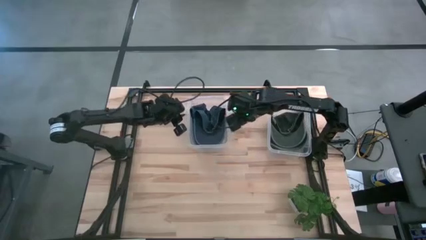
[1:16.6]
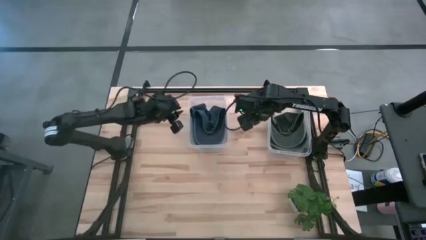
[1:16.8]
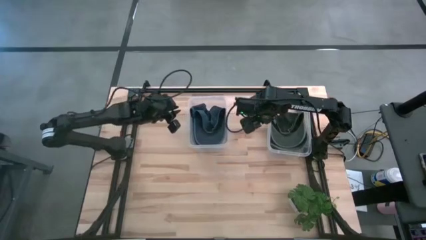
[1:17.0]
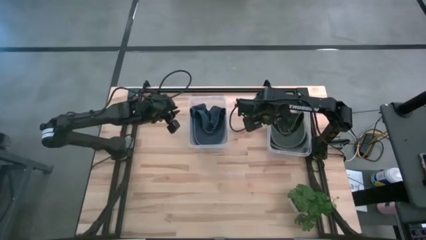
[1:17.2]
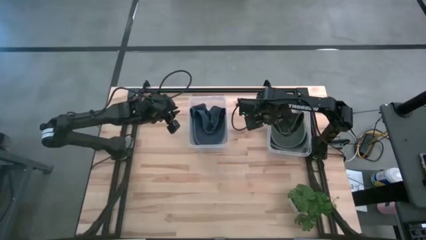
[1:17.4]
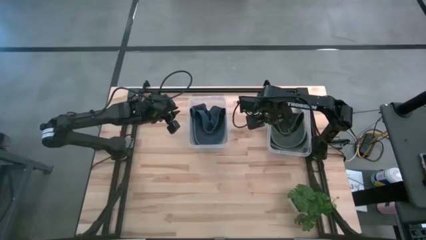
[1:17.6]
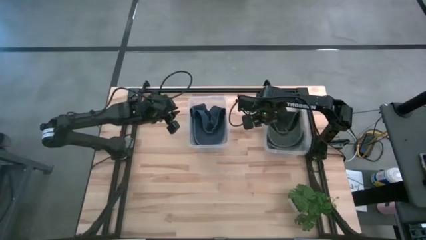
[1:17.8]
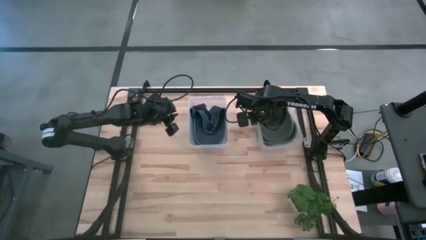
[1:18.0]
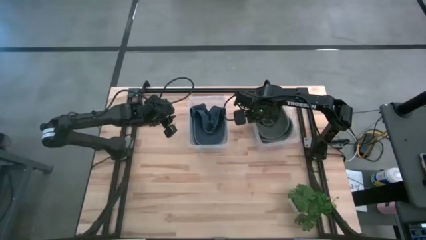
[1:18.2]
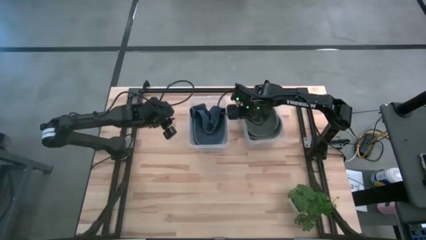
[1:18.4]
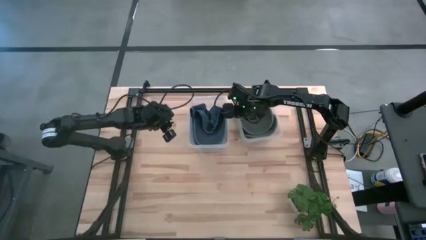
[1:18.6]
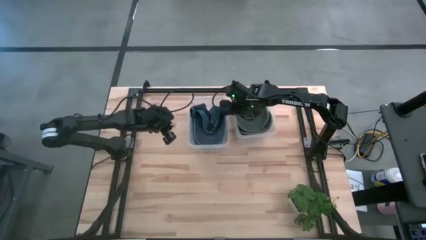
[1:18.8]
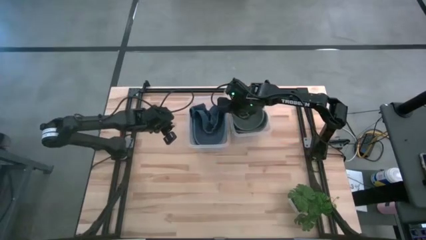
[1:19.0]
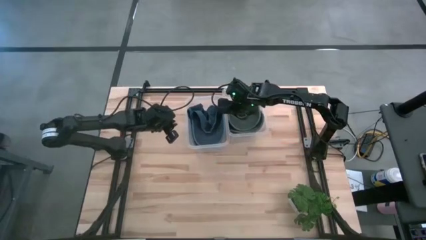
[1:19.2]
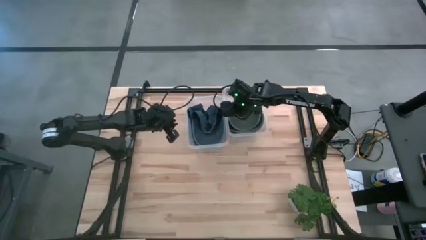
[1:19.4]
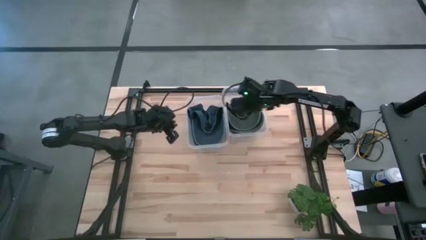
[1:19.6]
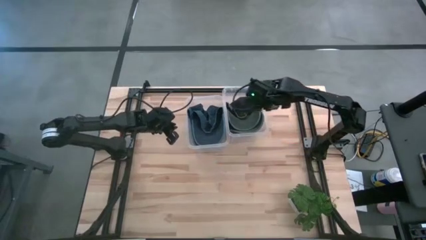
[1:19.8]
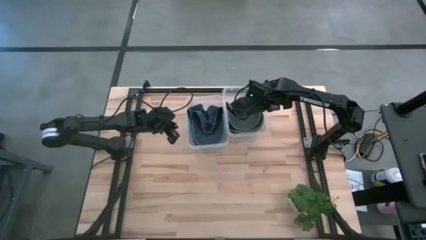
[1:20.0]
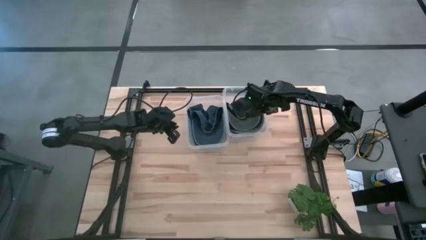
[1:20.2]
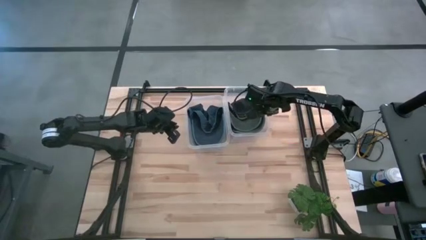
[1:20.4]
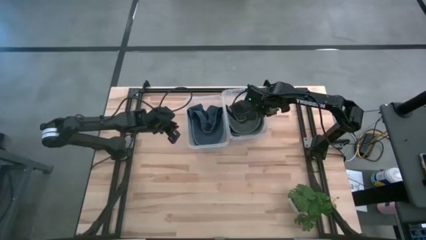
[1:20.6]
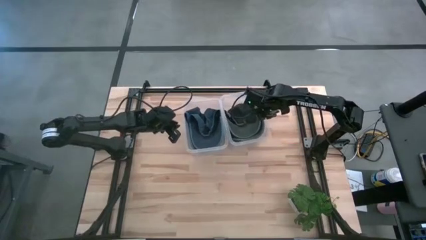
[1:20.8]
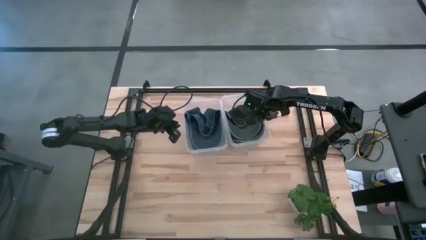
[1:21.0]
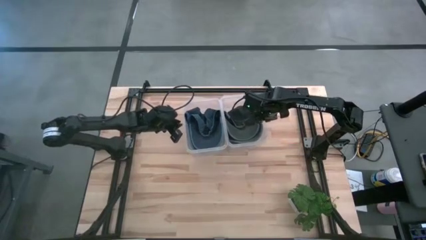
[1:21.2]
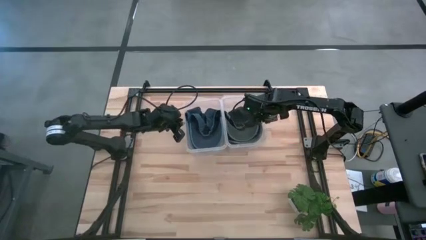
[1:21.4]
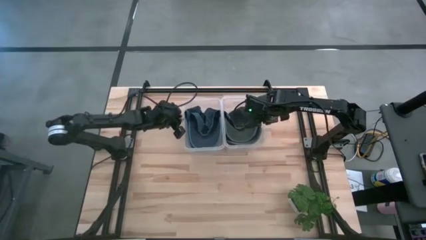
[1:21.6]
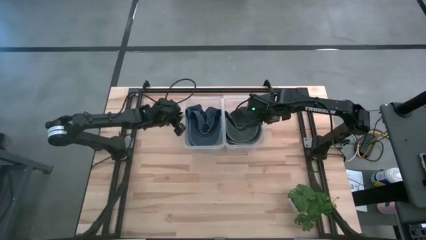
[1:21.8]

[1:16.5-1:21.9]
Task: Pick & Place hat
Adjust the right transparent bin on the table

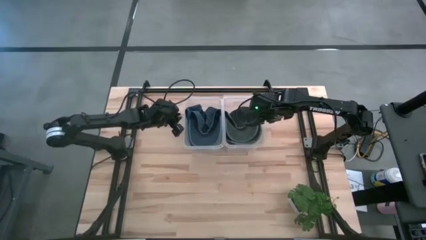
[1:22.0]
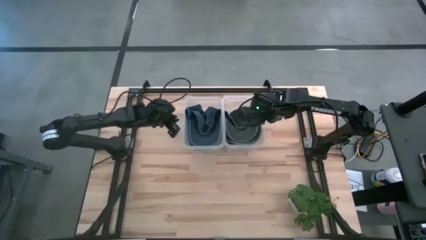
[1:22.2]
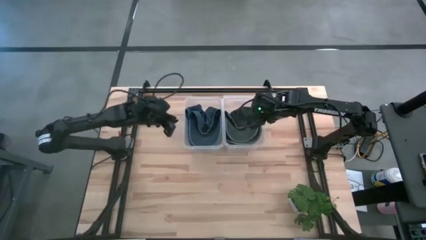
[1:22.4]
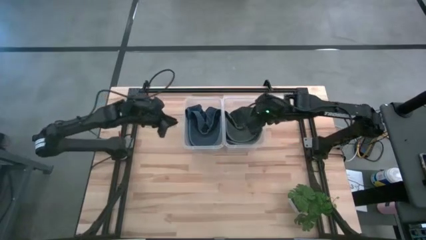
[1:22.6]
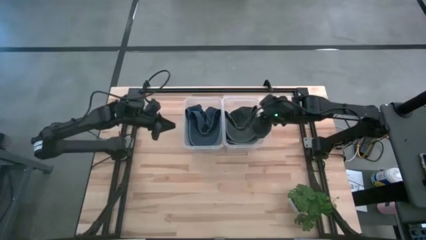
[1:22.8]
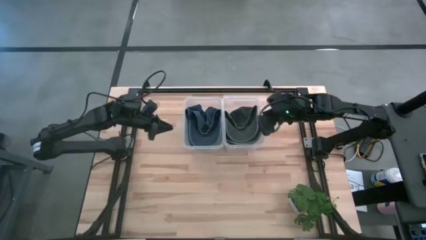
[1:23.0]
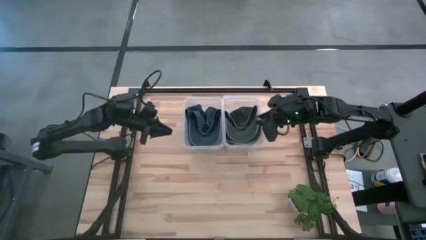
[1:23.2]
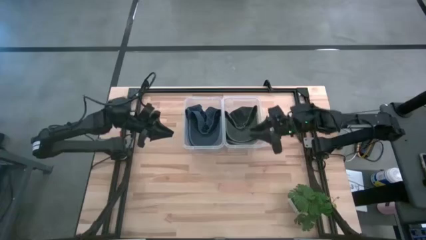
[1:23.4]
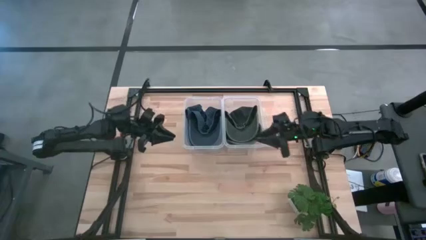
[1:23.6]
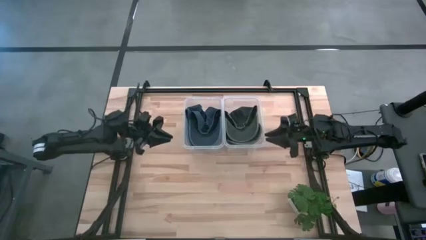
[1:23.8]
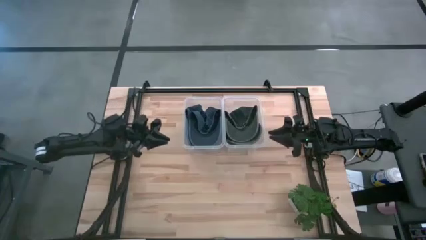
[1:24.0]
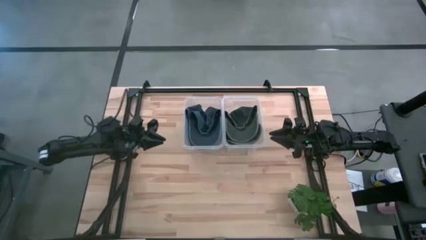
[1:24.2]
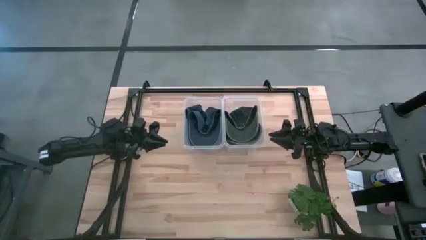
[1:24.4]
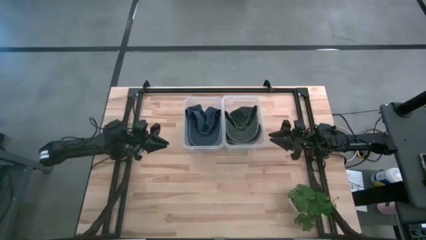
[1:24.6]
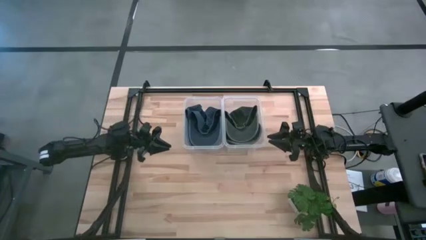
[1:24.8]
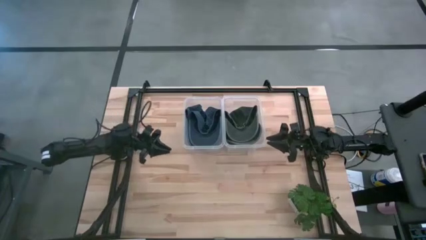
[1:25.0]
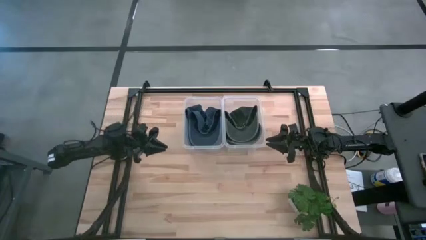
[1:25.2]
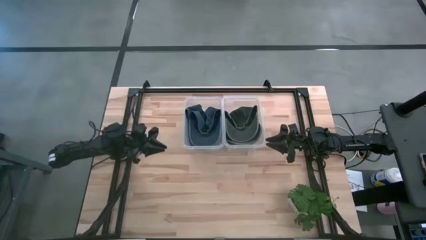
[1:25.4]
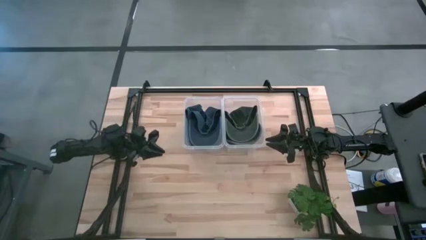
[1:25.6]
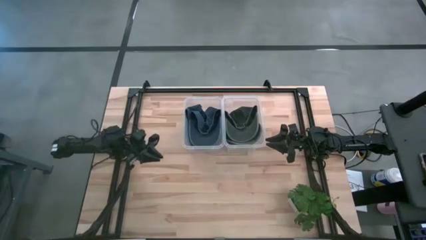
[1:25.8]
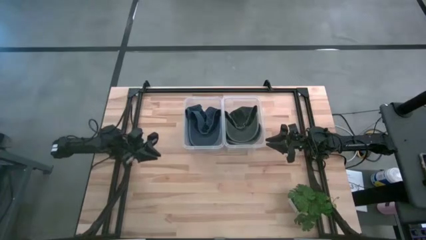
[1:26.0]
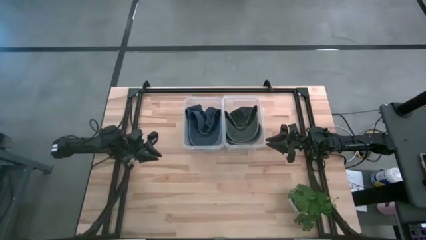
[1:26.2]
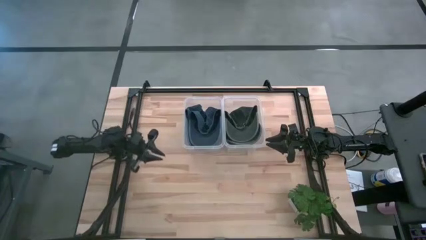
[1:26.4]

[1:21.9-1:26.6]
Return to Home Position

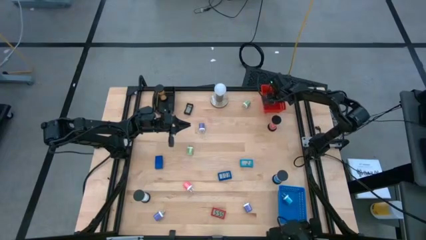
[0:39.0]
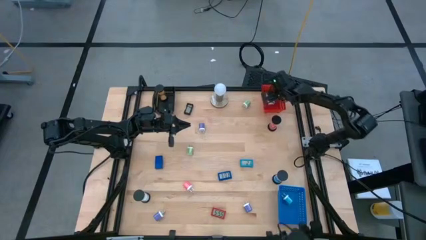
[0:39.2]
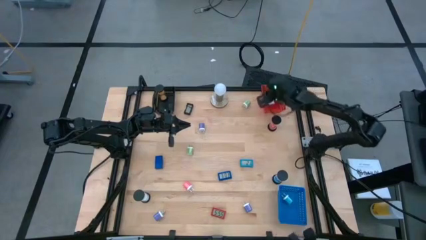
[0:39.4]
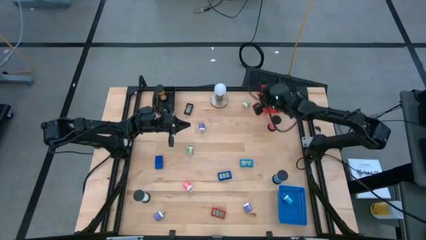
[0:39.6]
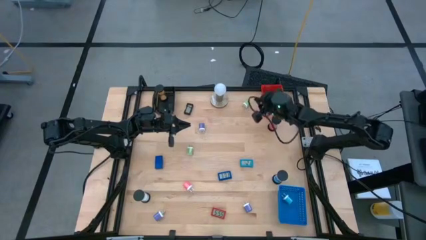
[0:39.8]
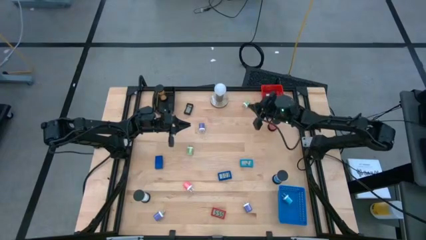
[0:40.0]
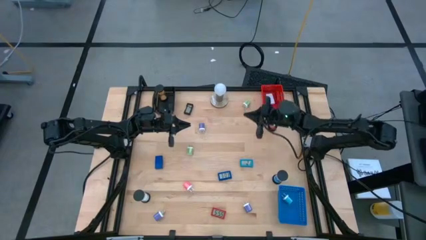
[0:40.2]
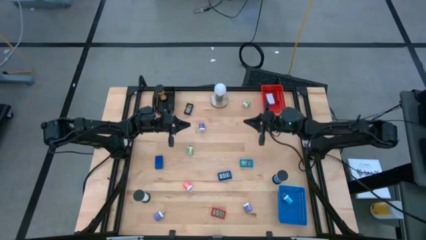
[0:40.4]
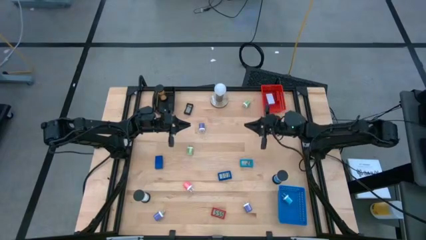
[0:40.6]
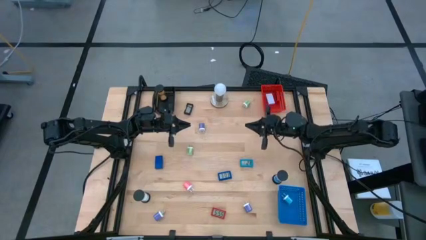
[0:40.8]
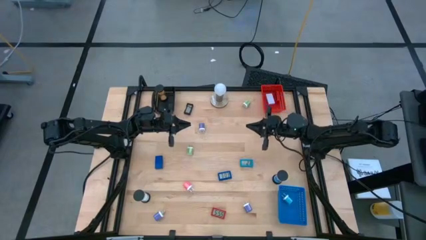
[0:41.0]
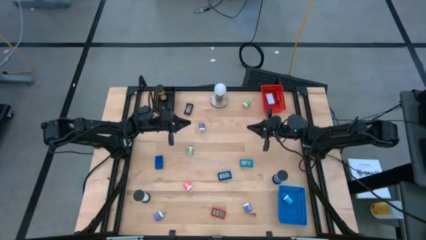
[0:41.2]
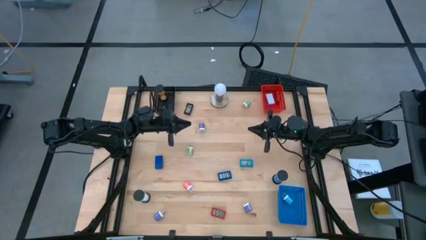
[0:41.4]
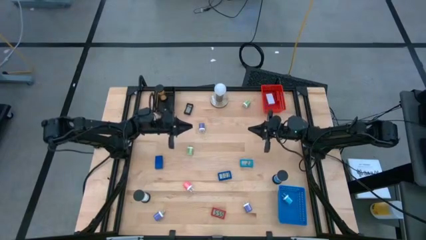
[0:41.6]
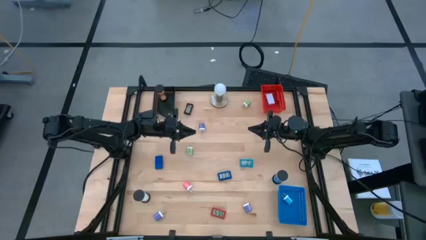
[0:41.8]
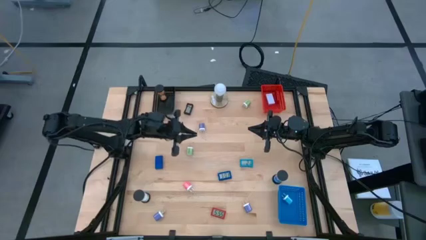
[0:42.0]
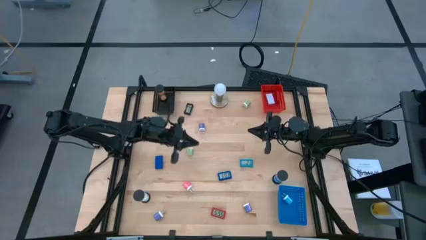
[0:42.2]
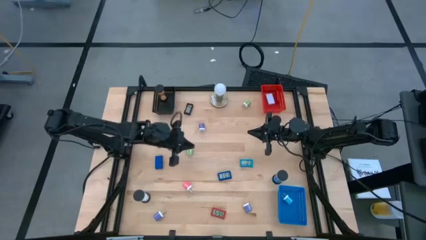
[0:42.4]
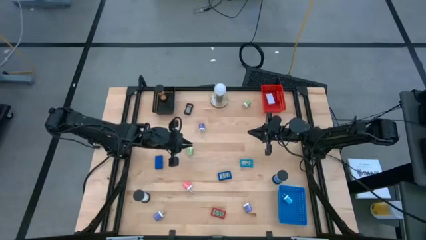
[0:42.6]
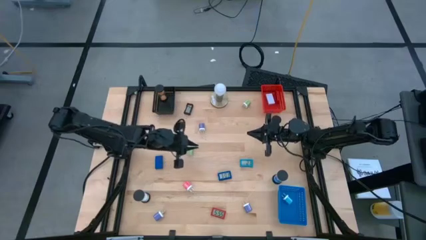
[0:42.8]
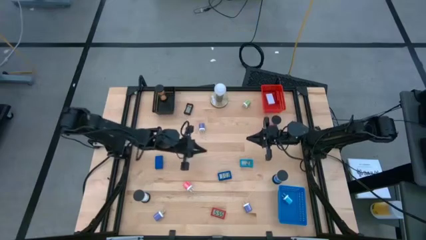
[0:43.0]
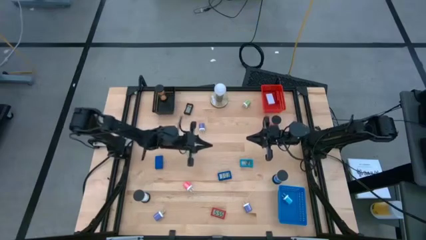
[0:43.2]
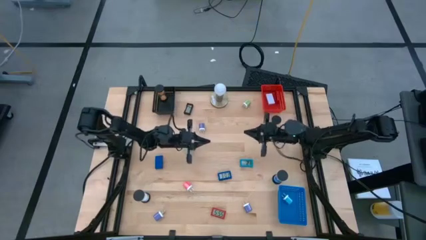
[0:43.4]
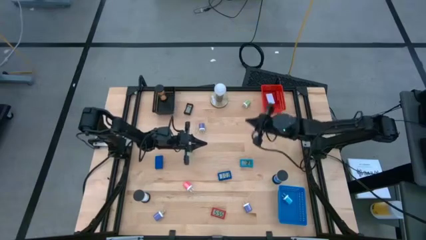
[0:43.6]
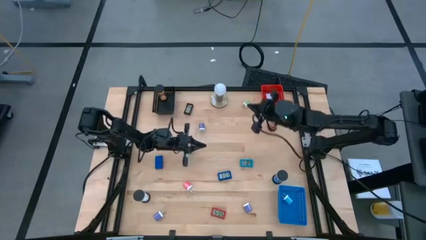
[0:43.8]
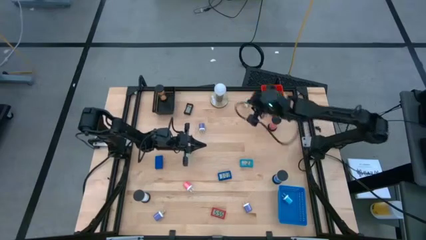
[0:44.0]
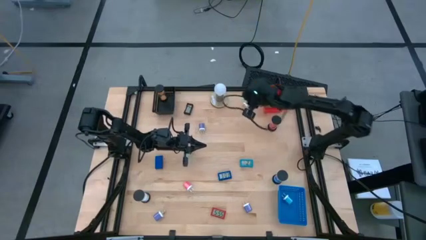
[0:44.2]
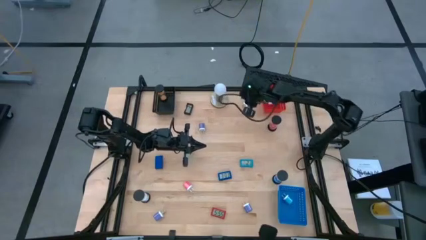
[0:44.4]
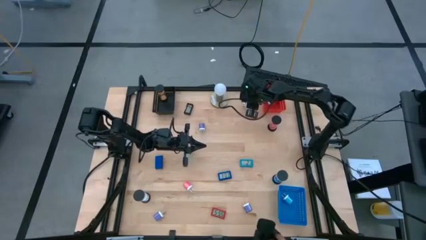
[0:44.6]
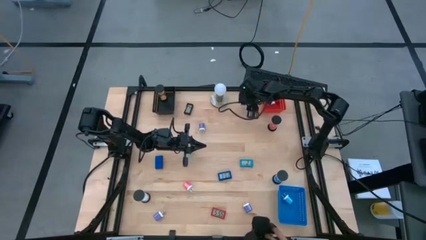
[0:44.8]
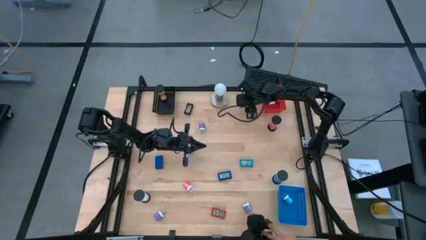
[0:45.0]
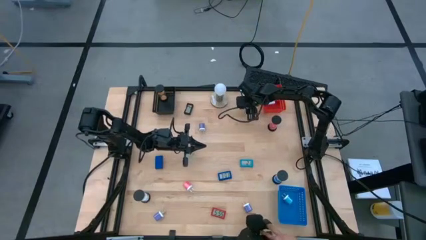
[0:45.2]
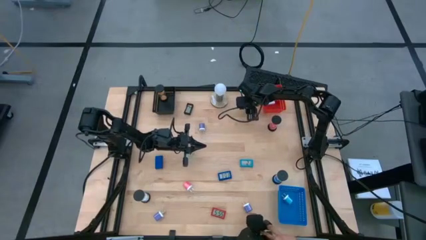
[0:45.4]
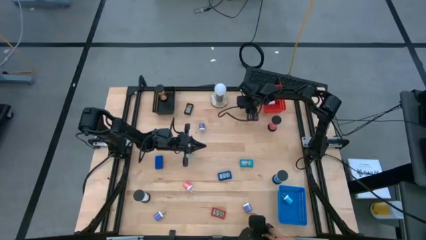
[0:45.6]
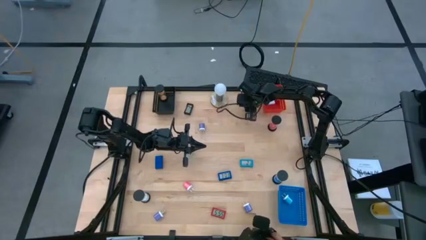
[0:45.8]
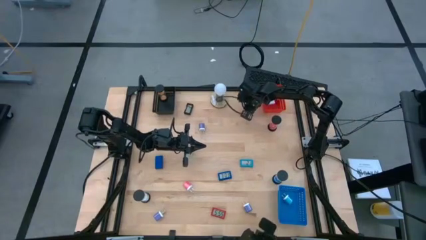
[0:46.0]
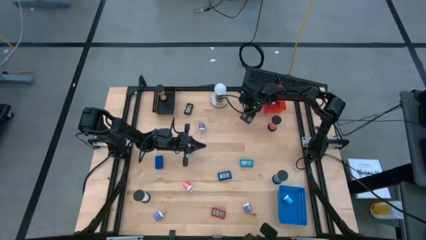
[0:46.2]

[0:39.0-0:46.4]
Task: Pick & Place Office items
Put the top green charger adapter into the blue bin
